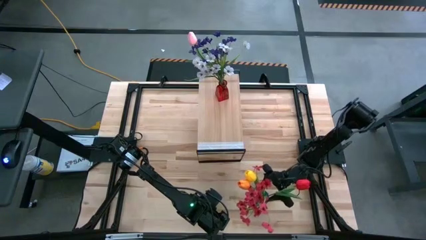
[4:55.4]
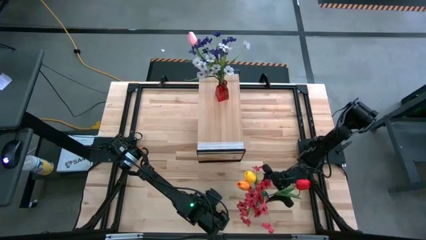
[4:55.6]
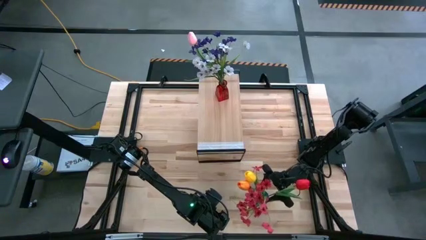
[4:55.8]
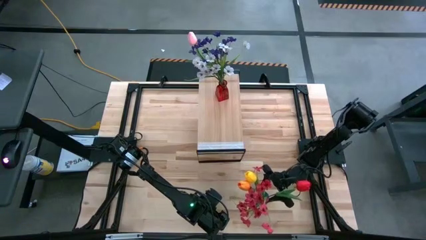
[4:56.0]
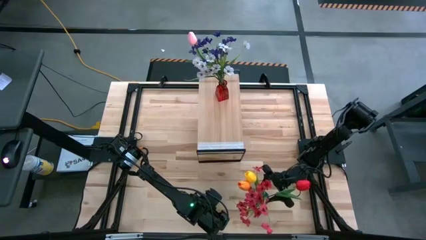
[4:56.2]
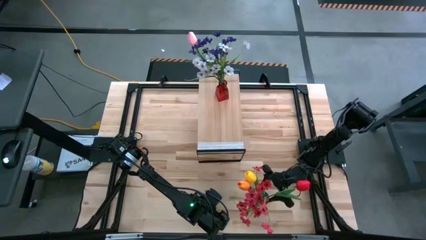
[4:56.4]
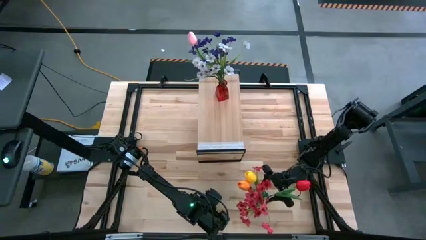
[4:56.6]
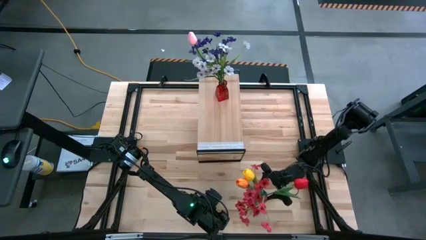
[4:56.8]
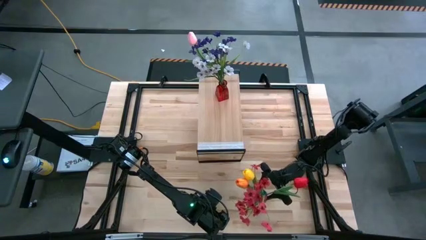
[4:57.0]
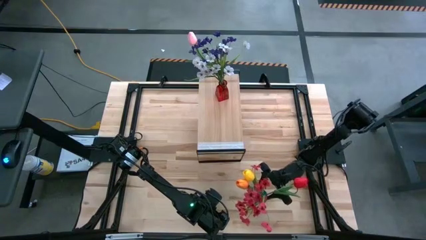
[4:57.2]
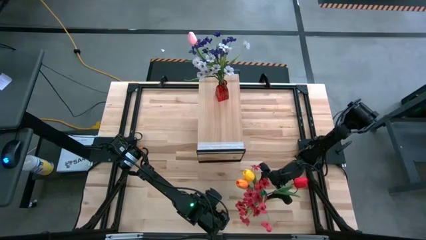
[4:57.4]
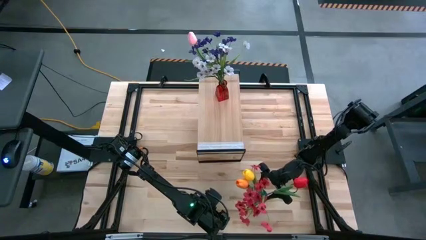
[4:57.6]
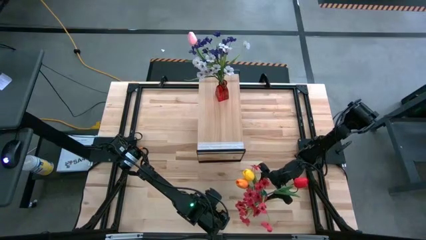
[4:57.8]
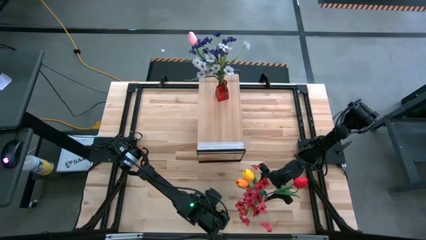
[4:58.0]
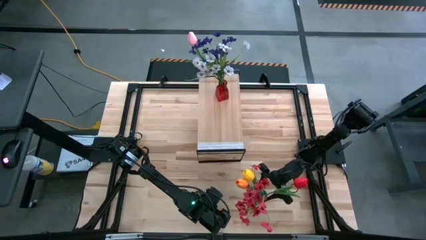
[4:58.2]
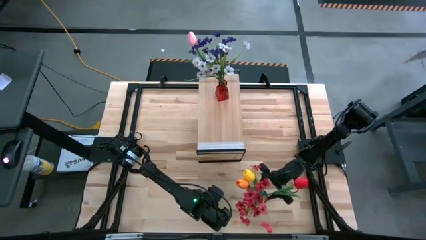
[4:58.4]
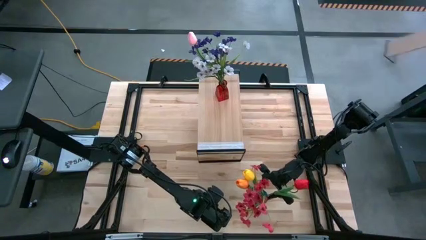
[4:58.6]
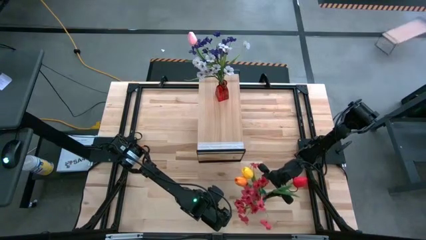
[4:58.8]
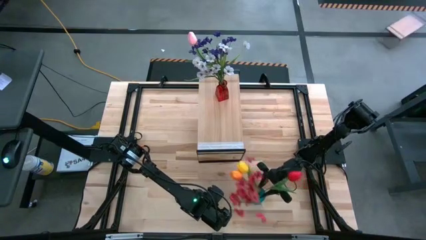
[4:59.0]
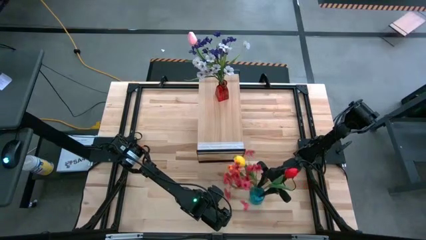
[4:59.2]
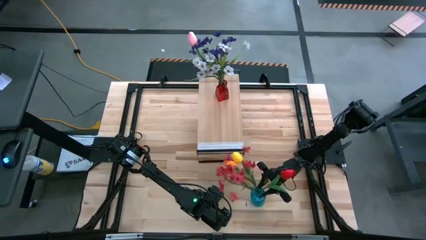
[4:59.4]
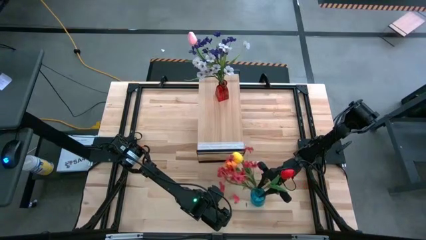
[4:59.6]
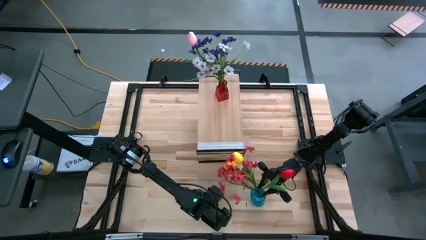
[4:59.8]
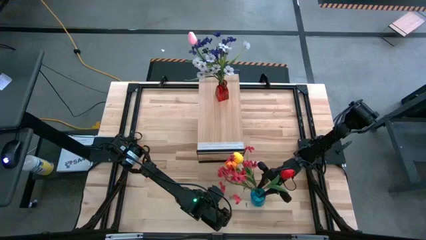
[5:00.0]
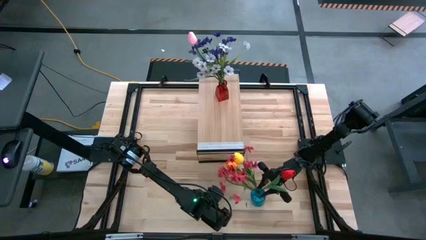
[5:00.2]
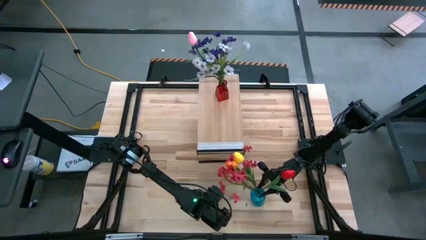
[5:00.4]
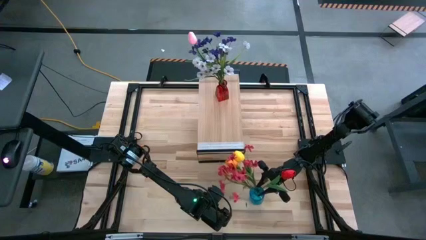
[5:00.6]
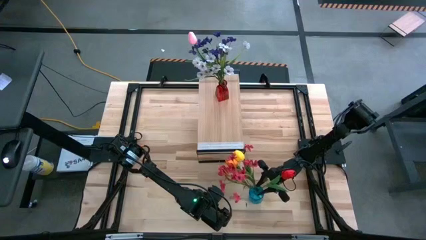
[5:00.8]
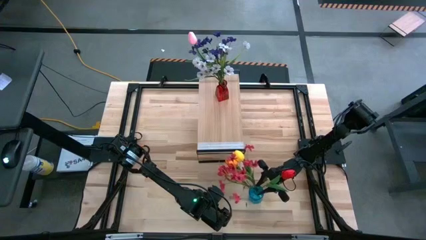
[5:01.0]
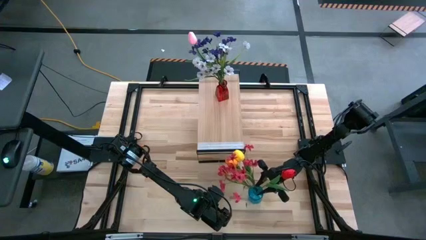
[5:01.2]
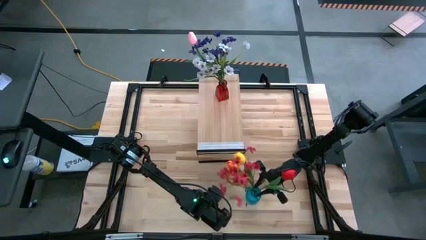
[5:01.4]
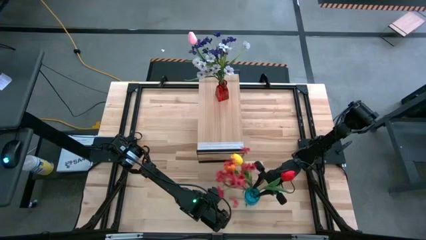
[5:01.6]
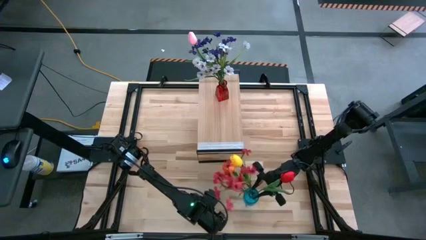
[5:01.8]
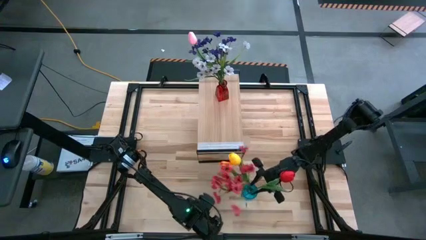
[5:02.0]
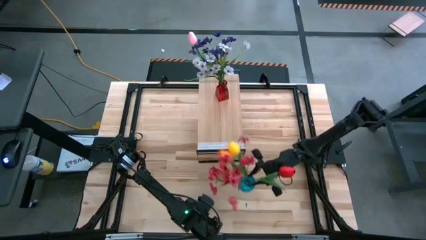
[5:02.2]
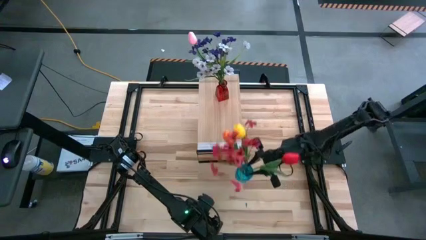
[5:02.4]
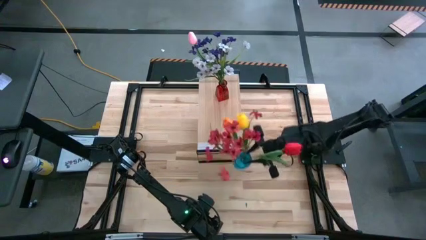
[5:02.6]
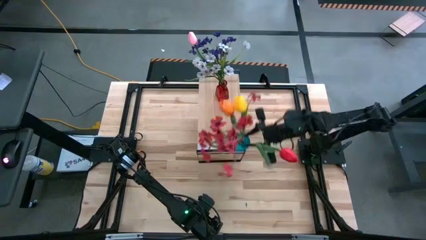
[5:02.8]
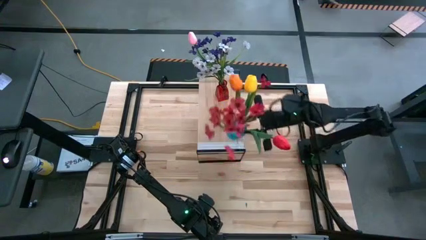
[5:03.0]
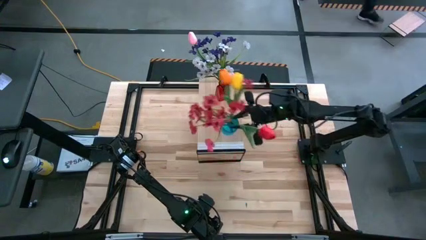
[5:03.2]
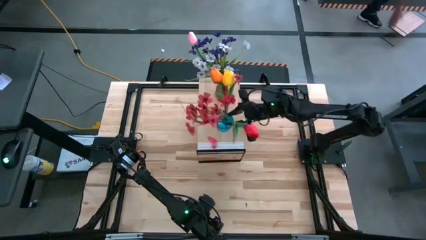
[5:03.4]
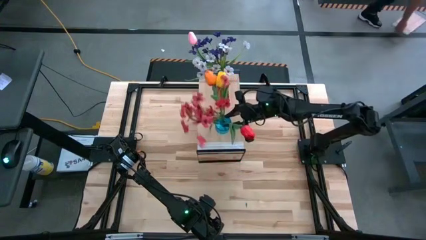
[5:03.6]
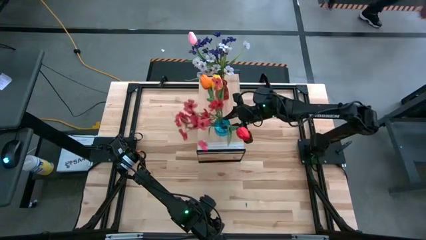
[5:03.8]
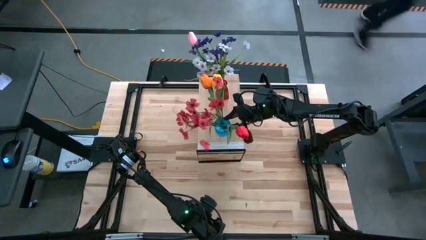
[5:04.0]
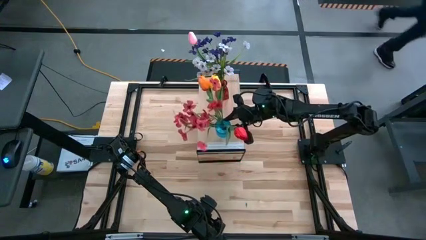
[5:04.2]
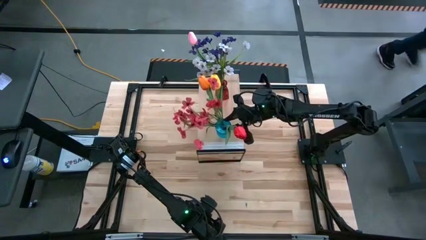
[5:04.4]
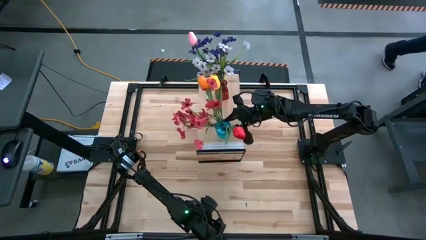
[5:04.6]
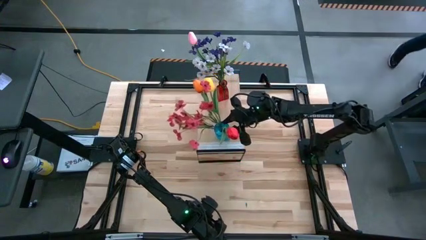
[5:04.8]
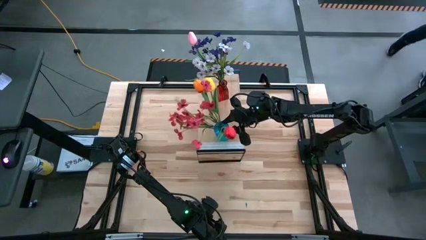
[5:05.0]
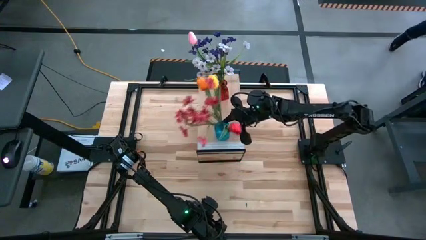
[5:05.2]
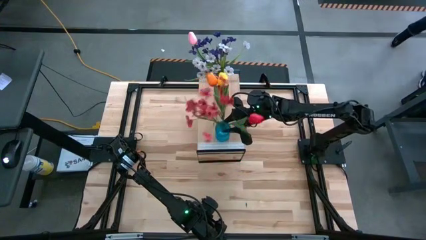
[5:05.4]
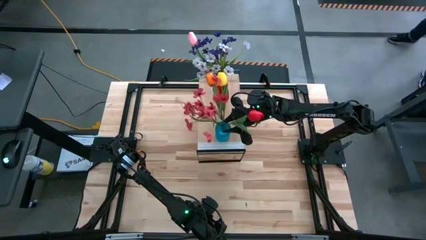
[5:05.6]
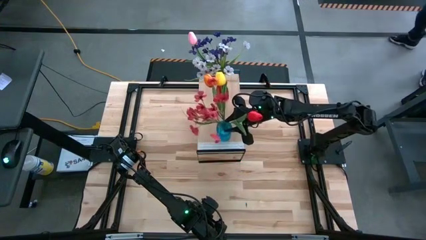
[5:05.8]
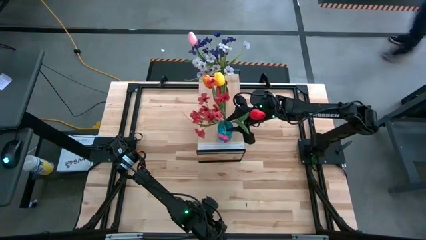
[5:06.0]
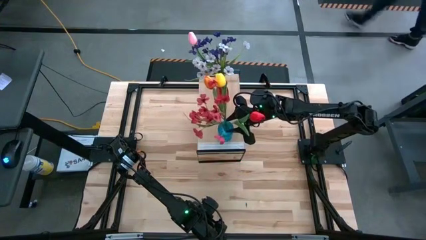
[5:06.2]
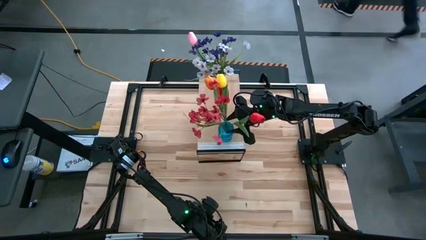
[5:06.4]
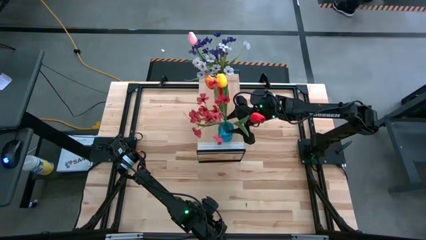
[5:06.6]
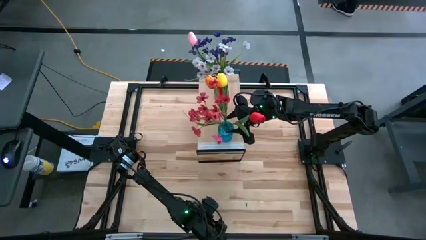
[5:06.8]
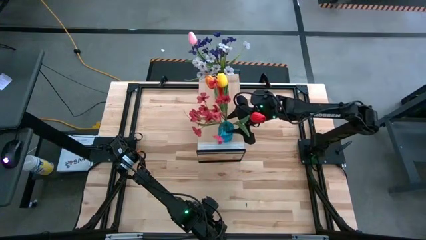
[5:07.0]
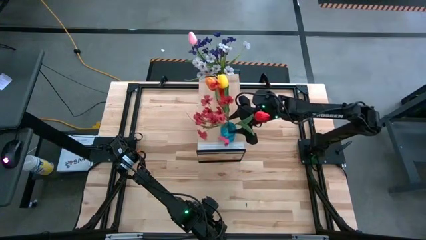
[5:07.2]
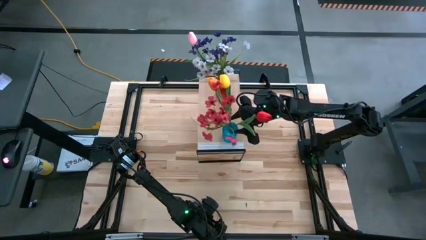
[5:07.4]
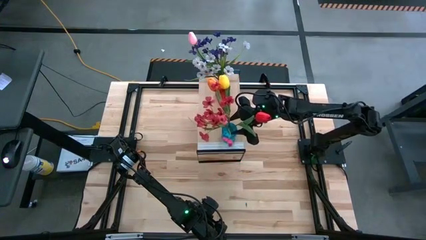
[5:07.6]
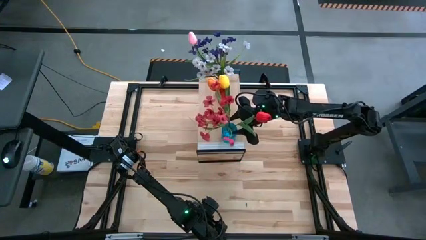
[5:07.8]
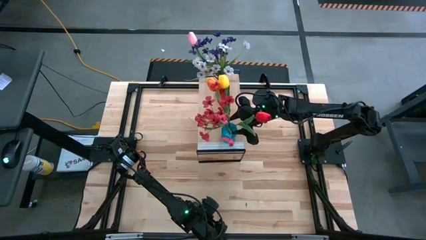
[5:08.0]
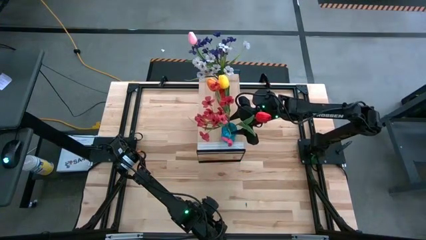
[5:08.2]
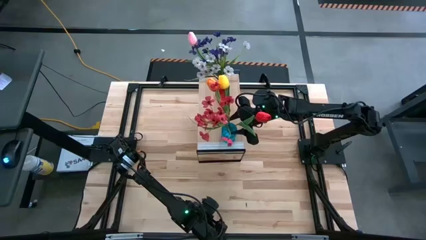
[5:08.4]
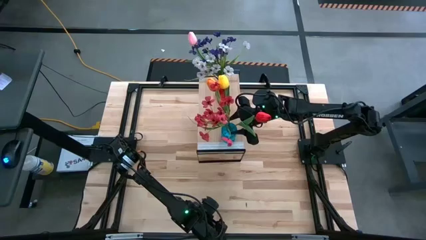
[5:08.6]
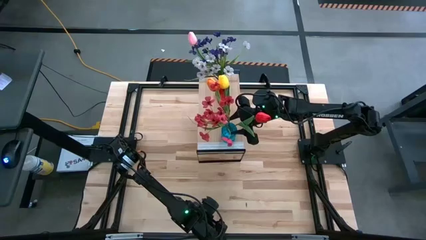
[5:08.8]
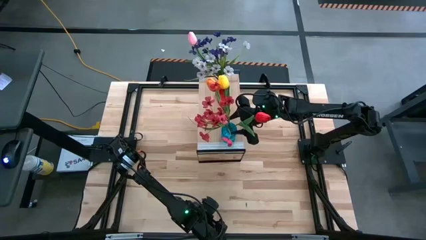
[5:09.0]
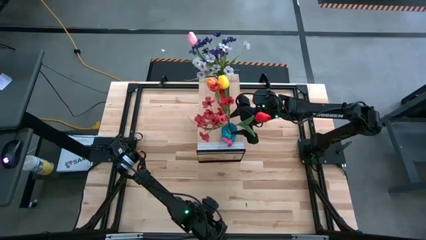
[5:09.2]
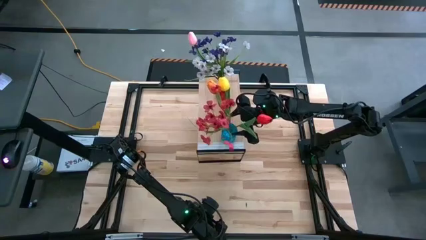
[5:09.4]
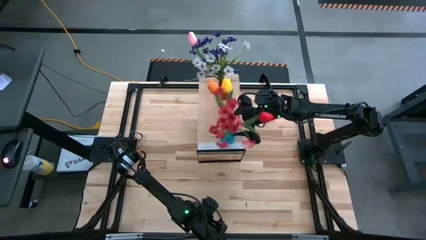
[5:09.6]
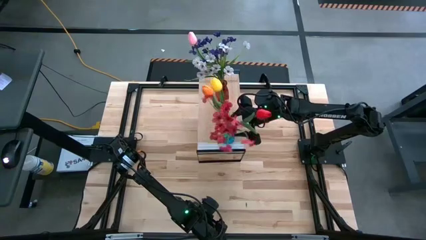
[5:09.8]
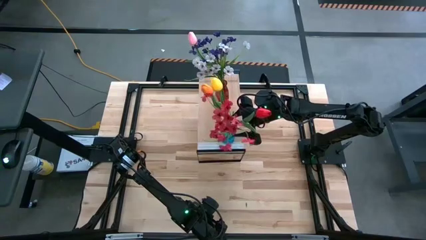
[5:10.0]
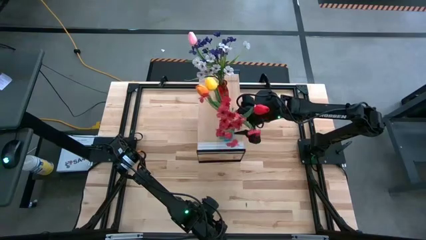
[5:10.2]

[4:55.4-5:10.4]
Task: Pick and place flowers into a vace then onto a shelf
Put the blue vase with flowers on the shelf
